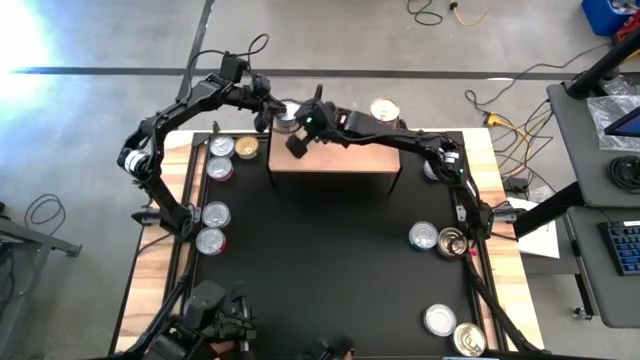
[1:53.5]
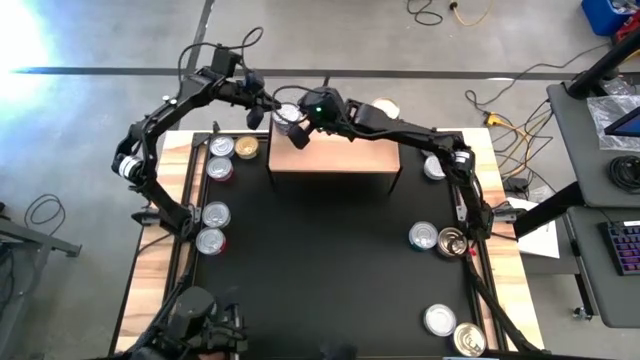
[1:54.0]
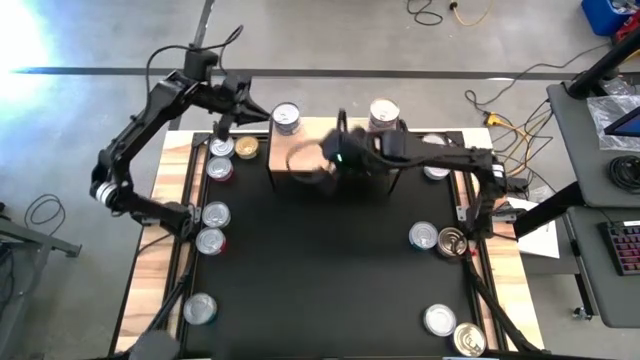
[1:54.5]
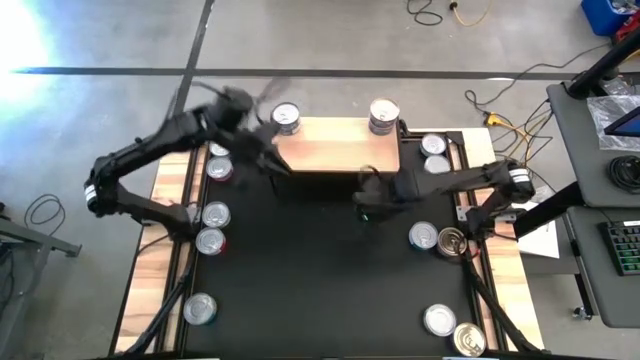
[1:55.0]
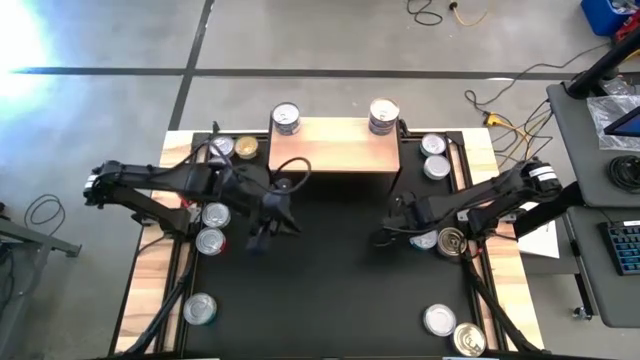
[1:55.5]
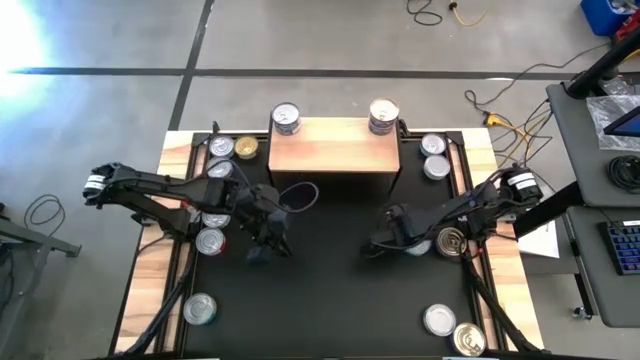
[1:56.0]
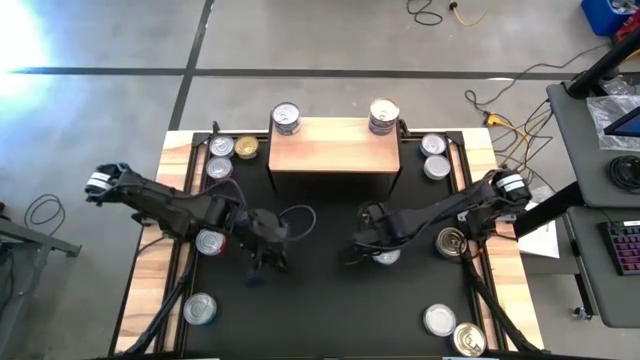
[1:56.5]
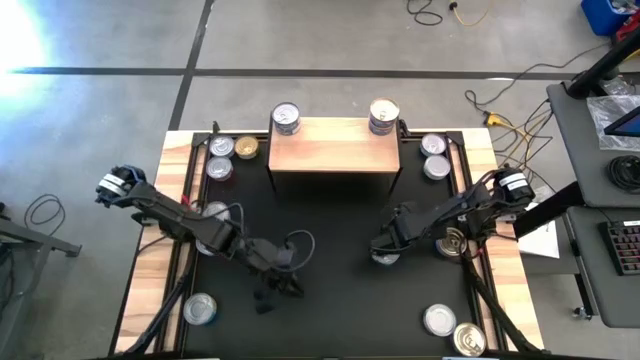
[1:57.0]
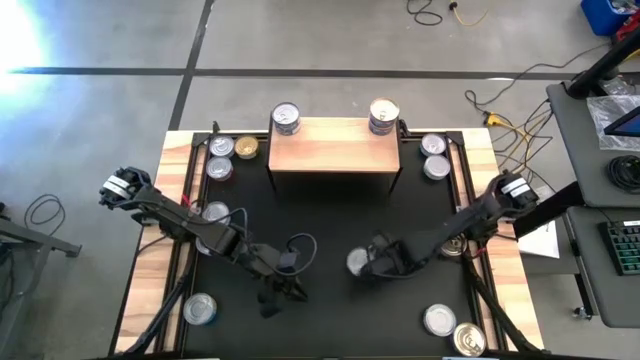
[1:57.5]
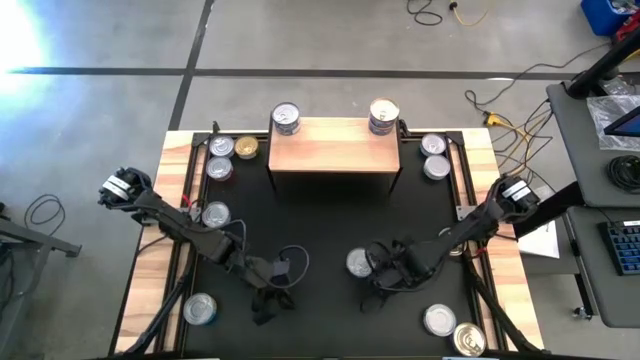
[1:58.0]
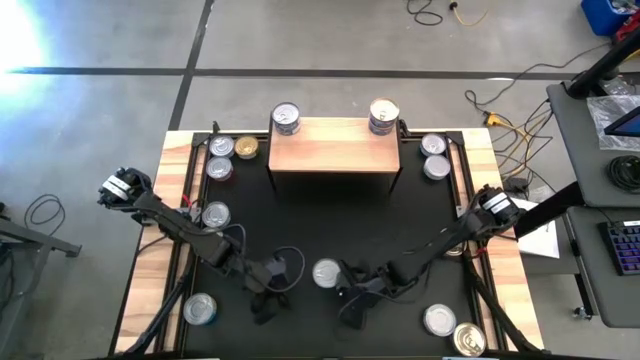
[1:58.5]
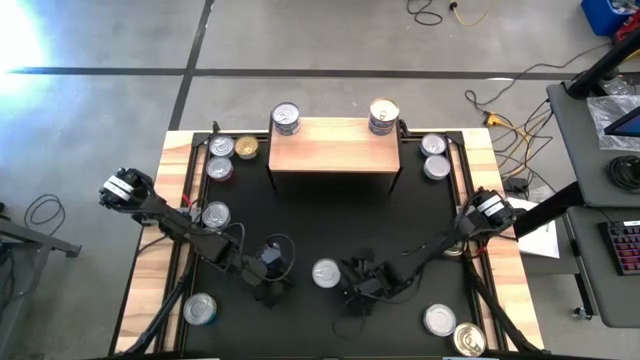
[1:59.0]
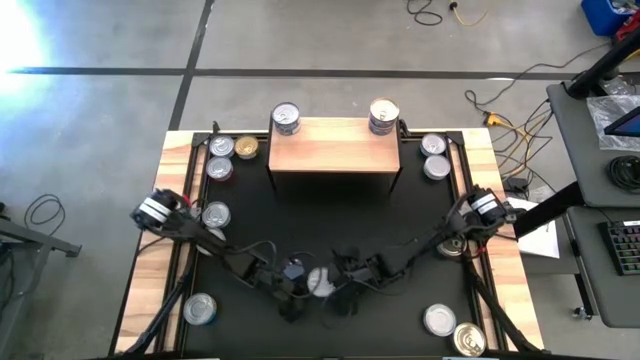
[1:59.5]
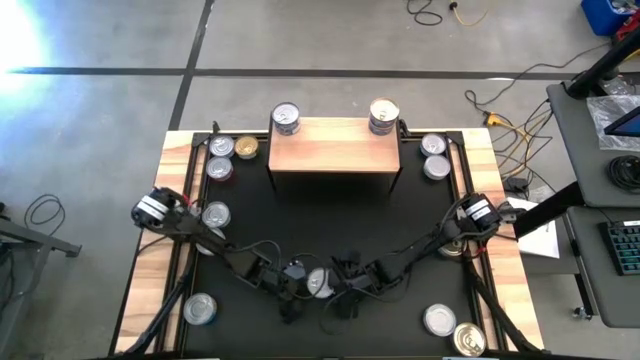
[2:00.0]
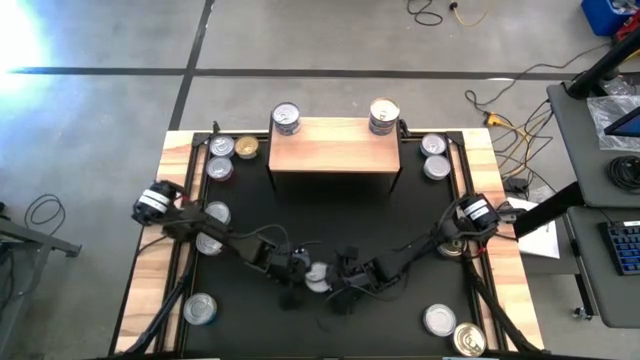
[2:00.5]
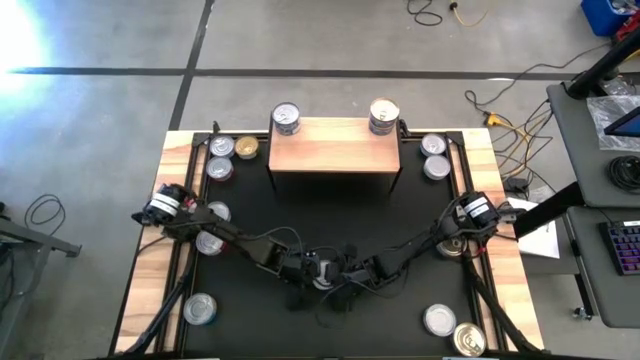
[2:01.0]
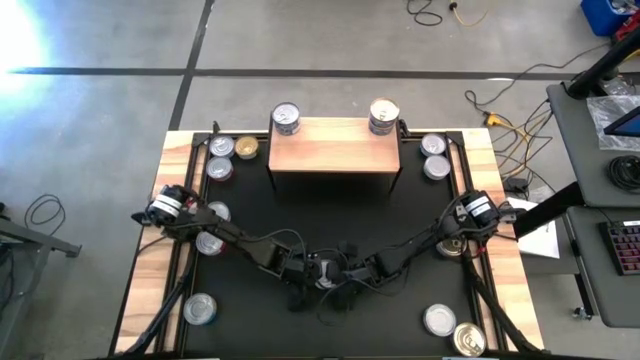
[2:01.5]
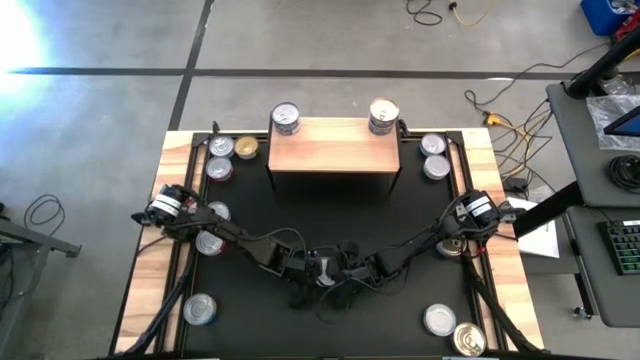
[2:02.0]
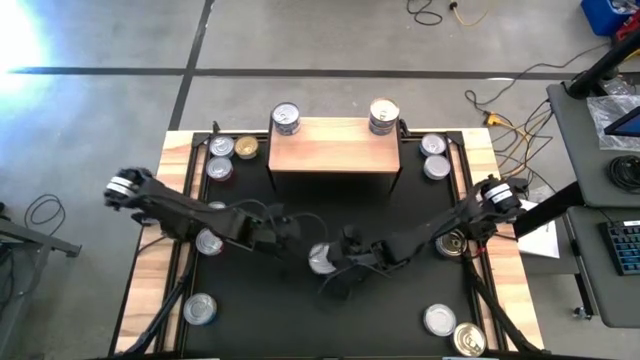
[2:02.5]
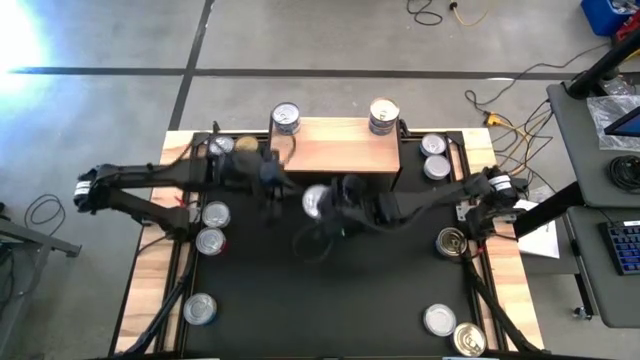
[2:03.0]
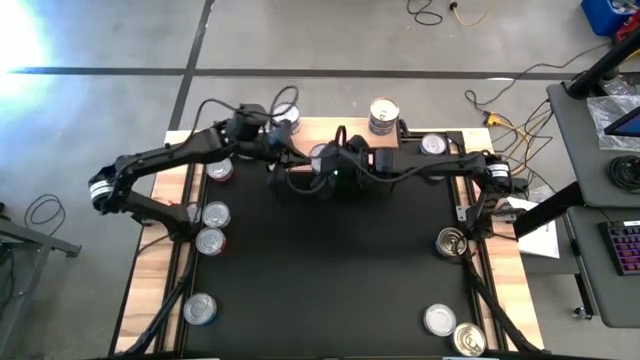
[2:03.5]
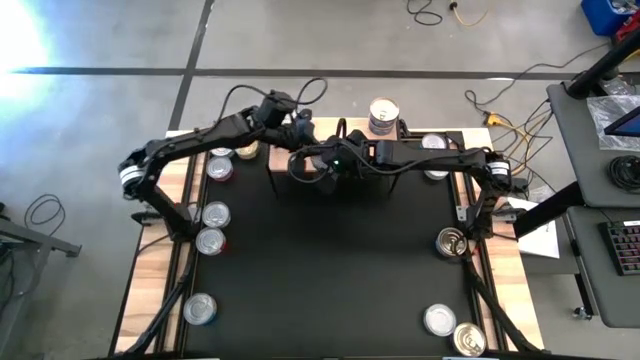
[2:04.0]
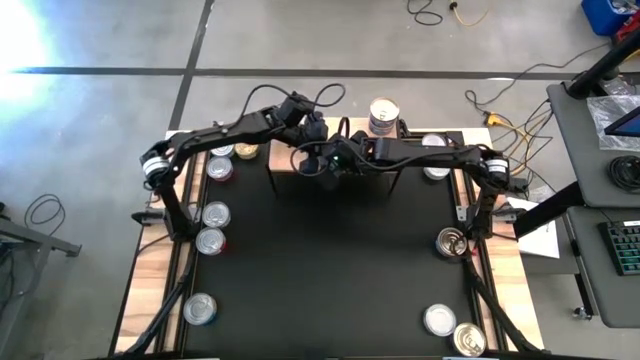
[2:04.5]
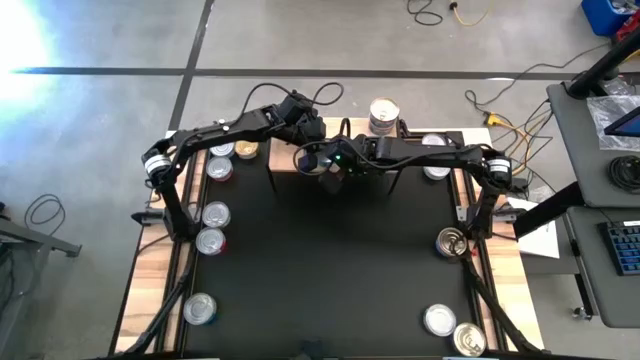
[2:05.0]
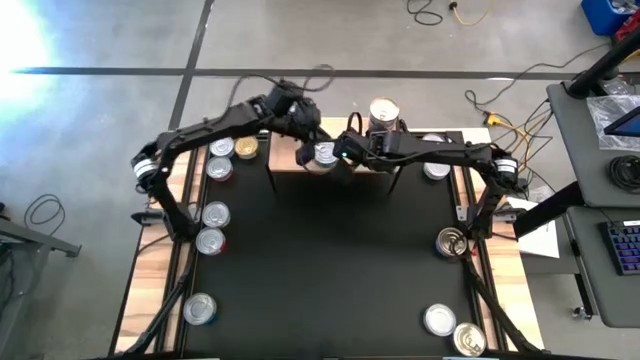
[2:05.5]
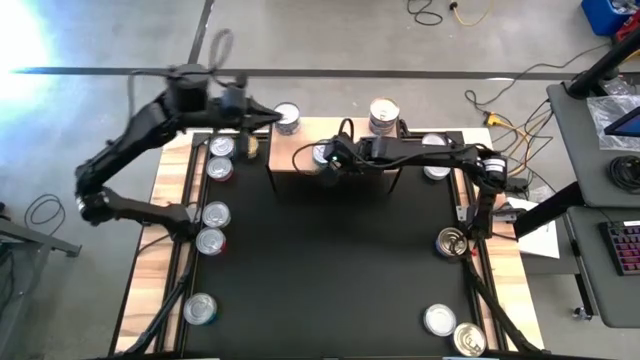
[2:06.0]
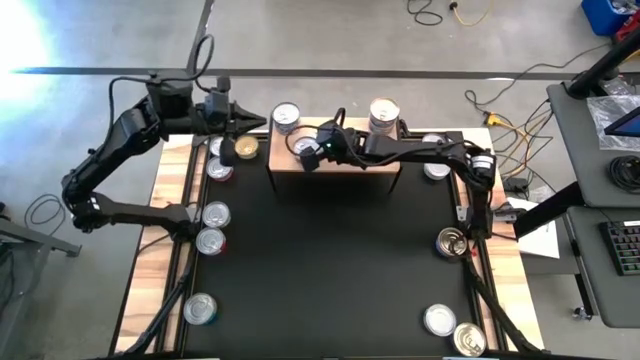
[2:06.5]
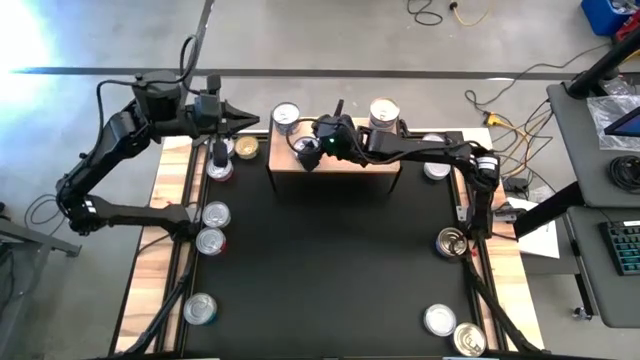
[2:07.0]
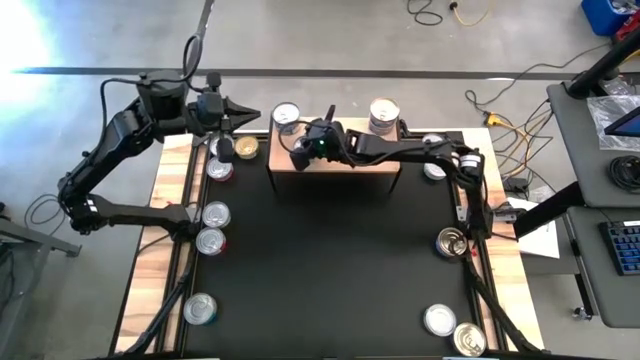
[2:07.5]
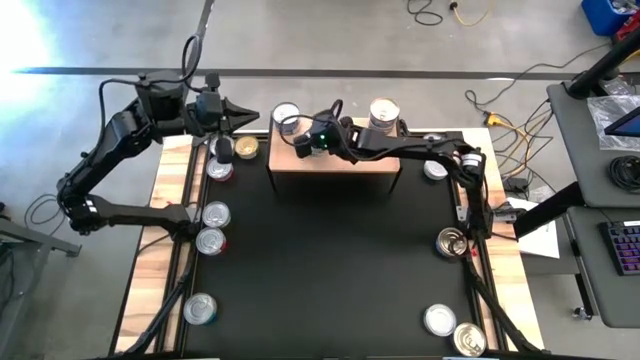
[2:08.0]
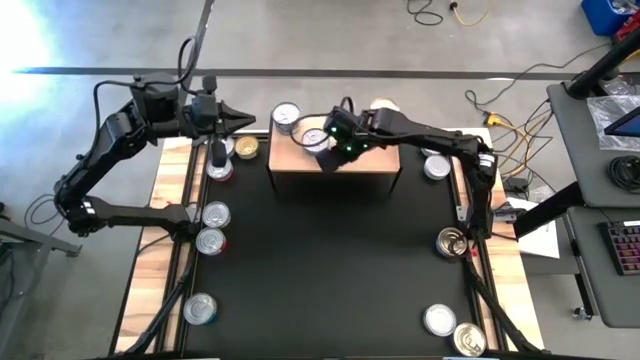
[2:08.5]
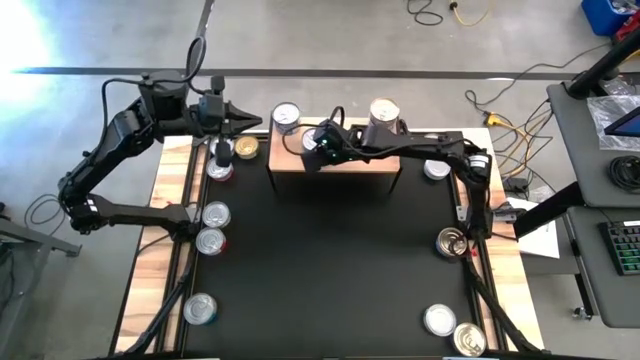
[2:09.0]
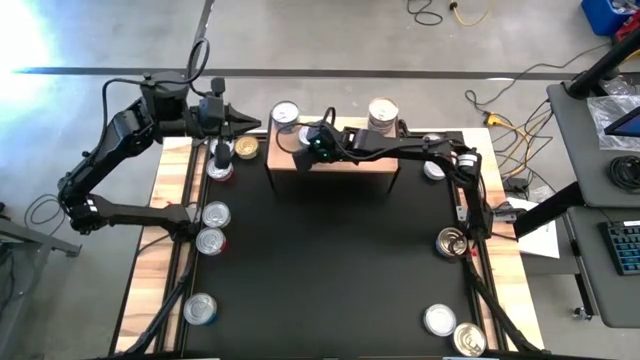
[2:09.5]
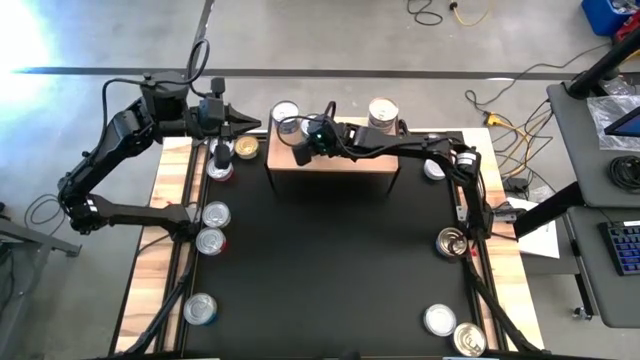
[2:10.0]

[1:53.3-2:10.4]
Task: Stack canned seafood by type on shelf
Put the bottom green-blue tuna can on the shelf

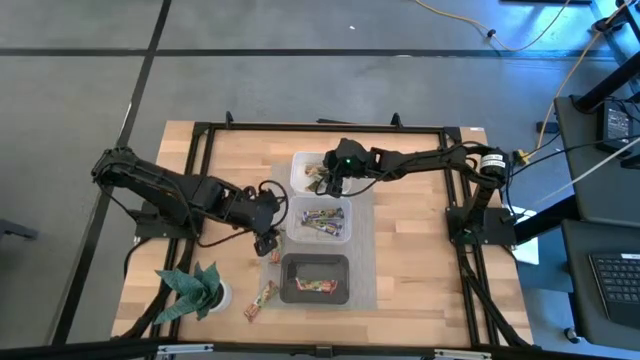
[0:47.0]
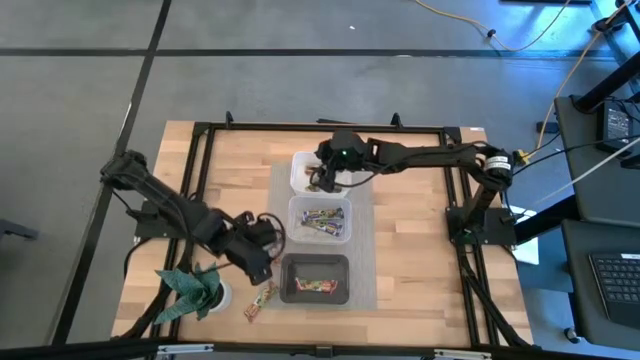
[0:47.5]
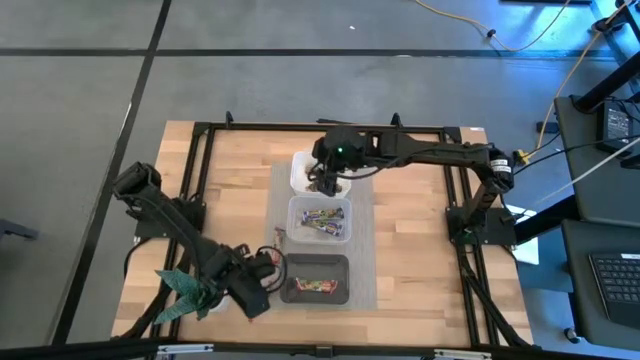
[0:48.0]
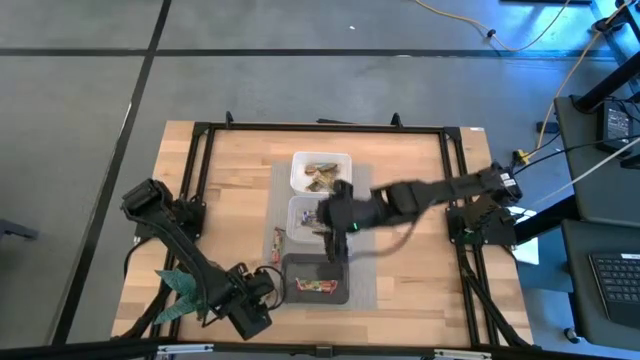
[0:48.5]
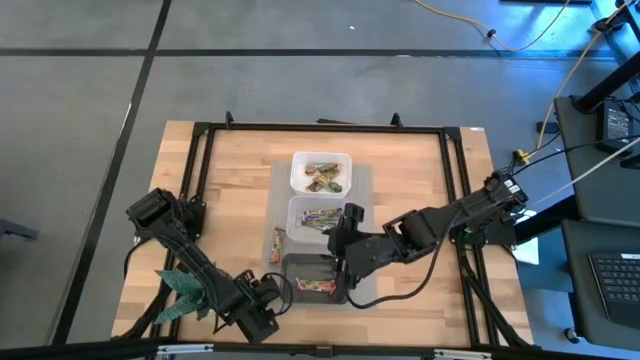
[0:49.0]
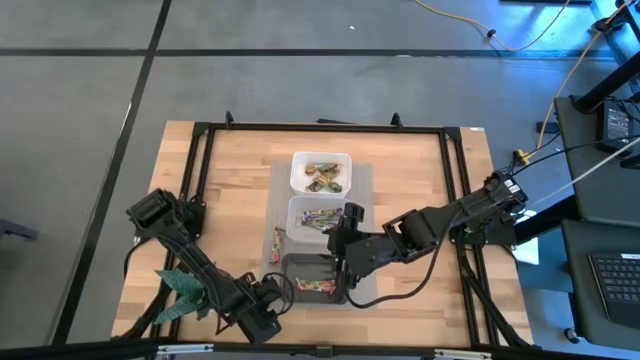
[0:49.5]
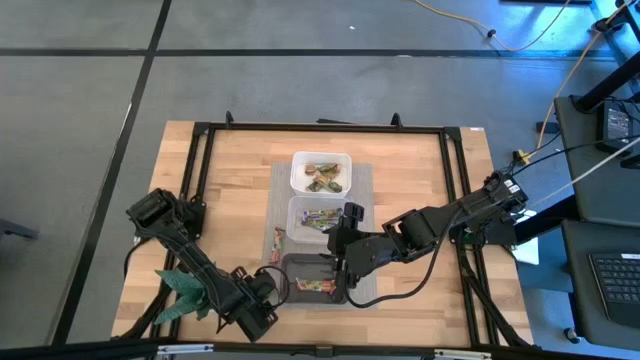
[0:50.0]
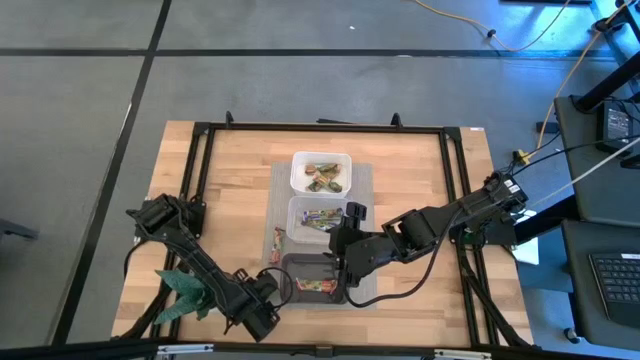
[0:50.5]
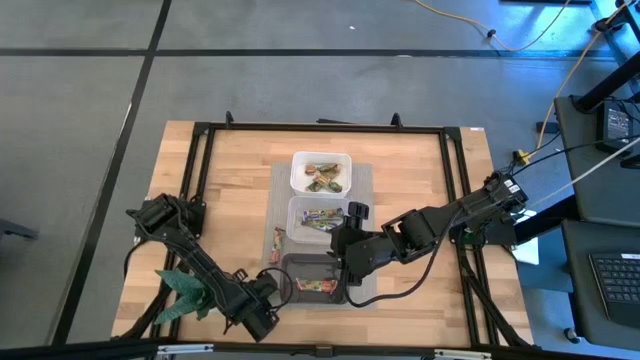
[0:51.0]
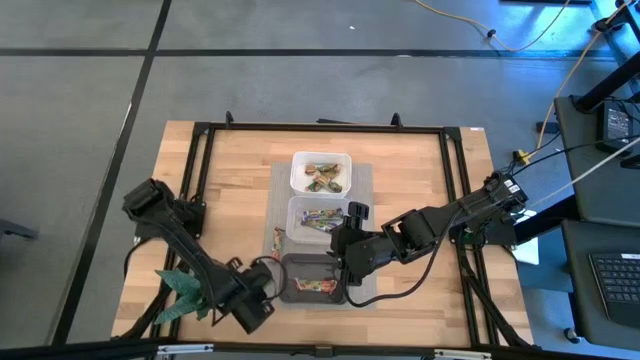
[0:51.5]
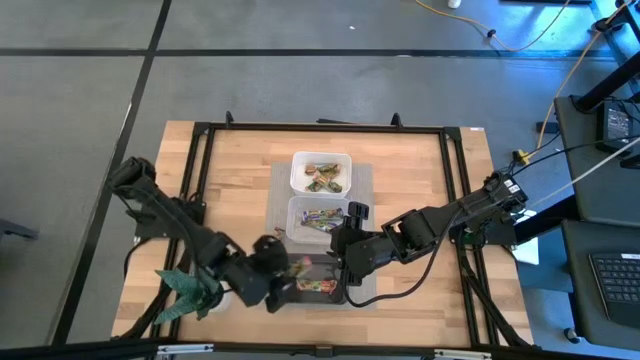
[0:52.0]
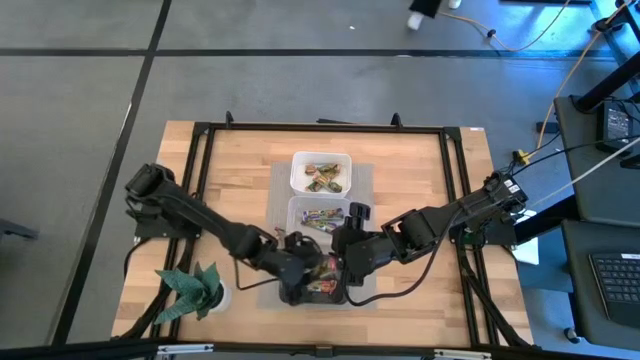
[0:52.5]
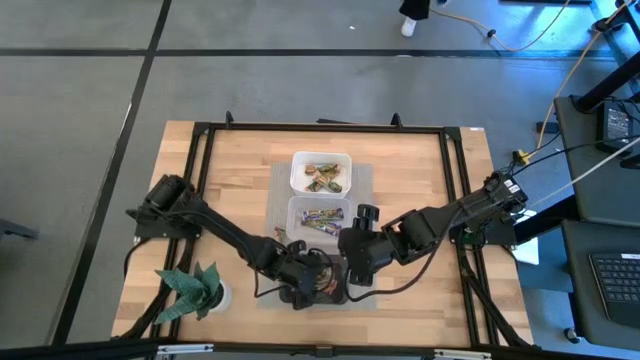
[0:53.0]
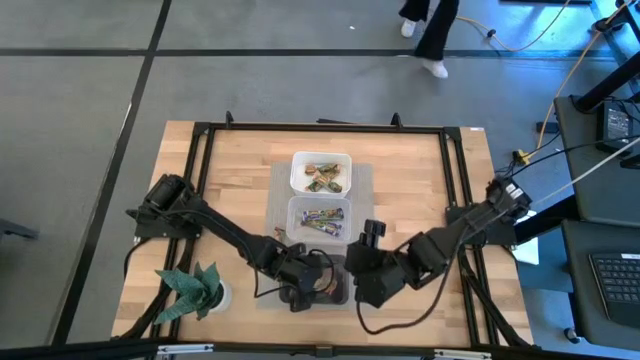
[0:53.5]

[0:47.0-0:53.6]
Task: Pick and place Granola Bars by type
Put the bottom red granola bar into the black bin
